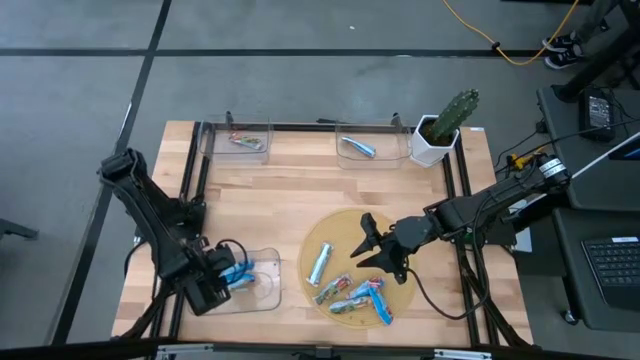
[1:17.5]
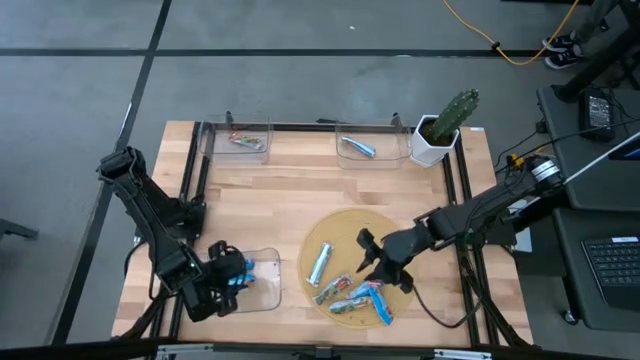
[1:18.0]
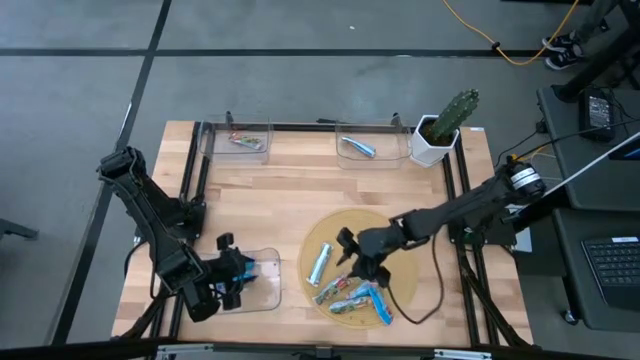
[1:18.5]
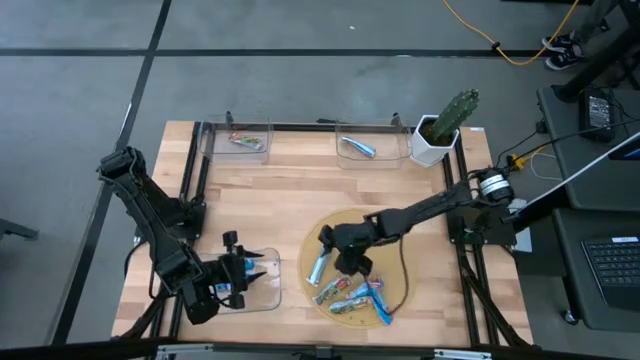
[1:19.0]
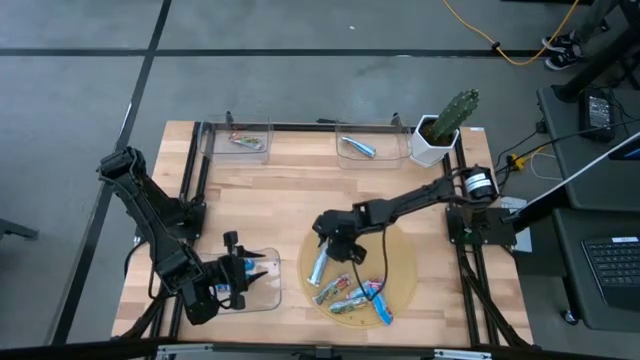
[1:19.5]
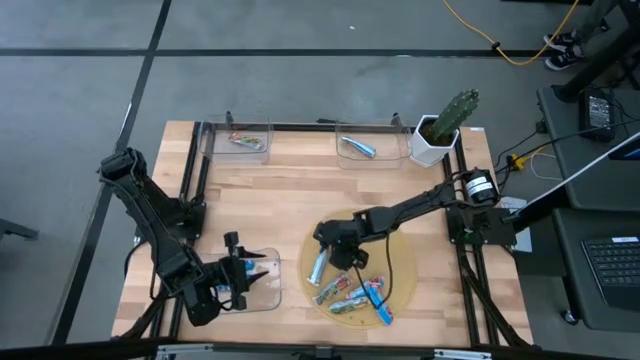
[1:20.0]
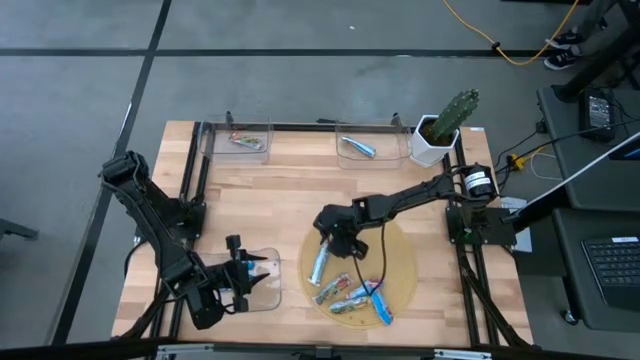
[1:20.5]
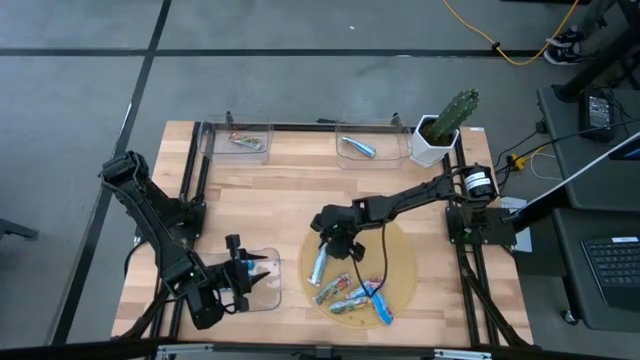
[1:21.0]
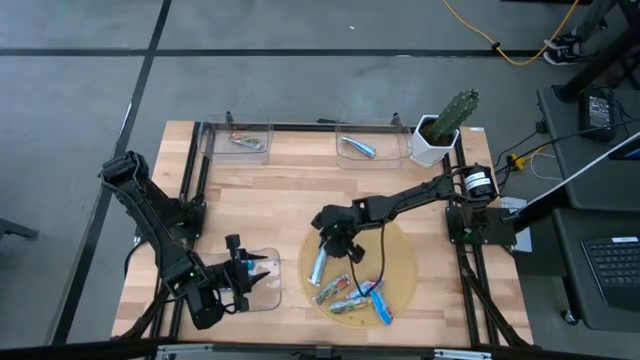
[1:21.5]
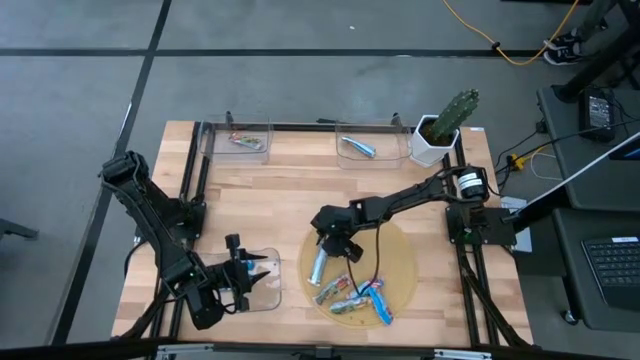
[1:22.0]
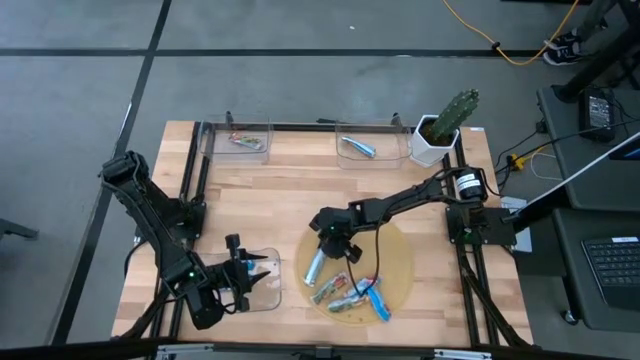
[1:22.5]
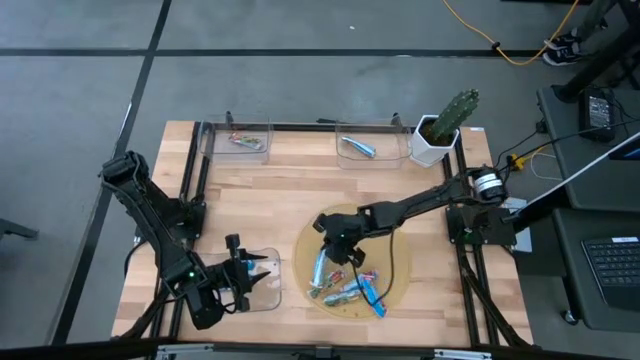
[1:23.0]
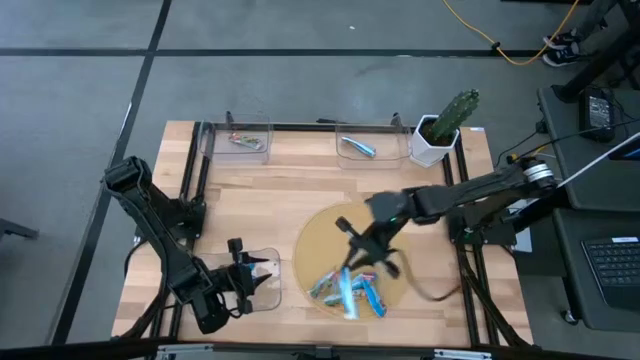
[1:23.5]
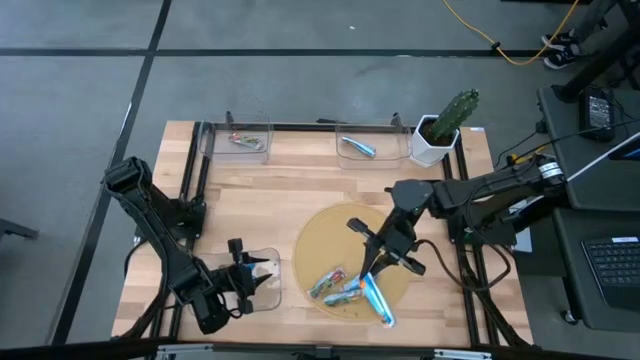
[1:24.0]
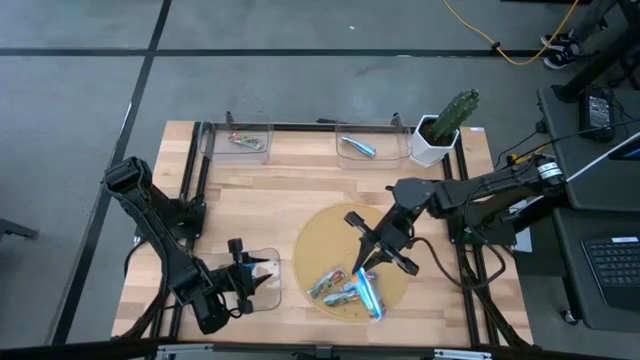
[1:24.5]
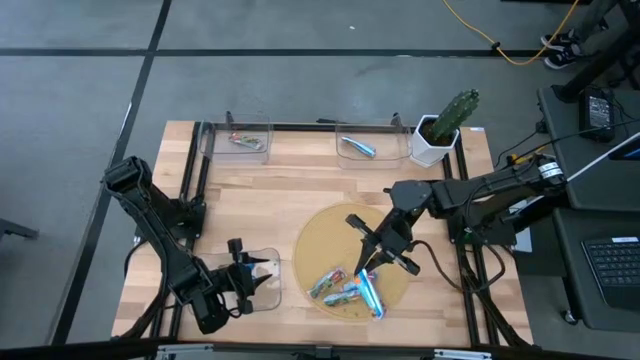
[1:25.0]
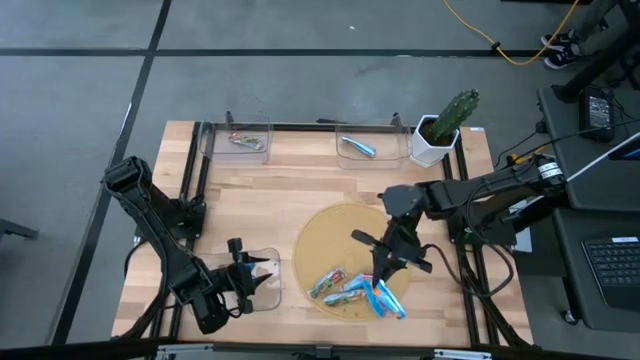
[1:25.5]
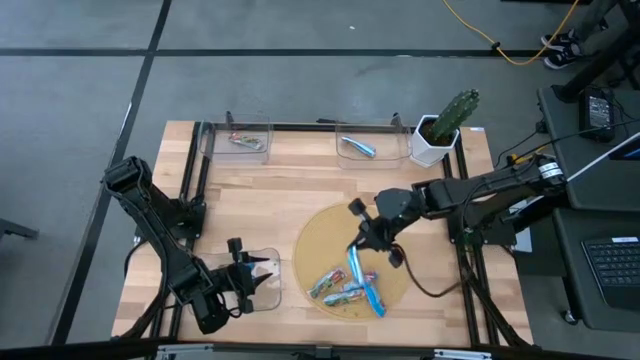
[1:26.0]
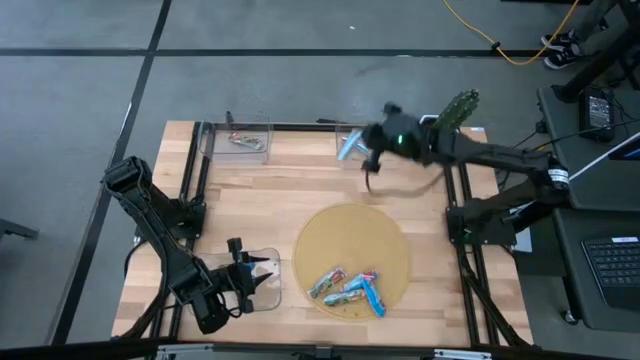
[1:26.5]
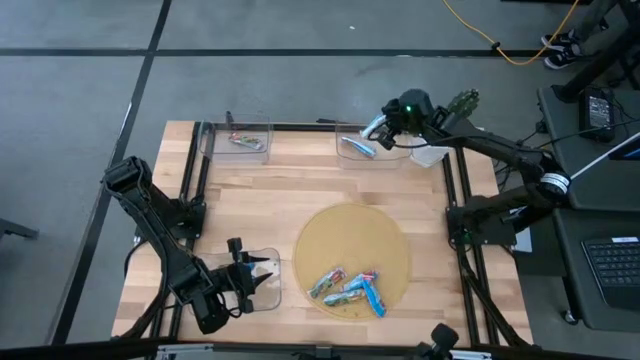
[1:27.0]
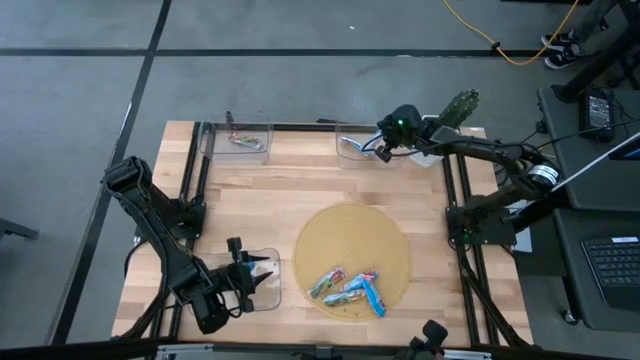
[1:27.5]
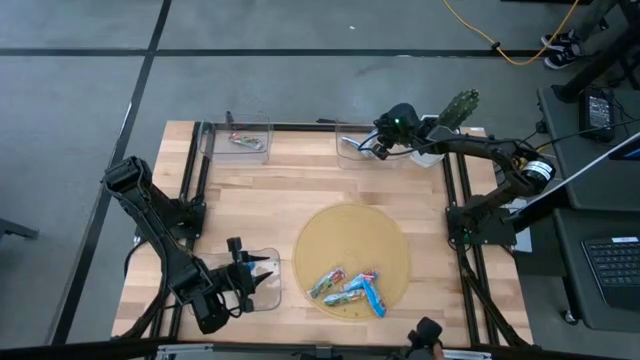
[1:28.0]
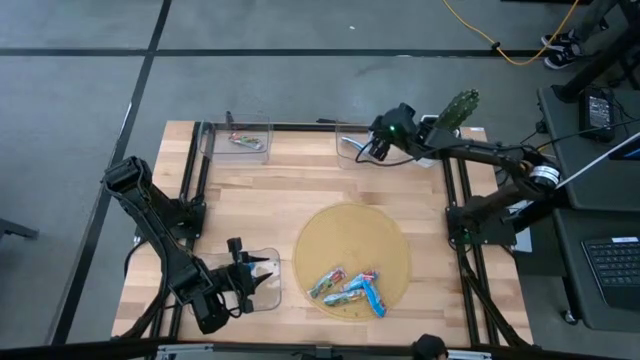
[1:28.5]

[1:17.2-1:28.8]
Task: Pick and place Granola Bars by type
Put the orange granola bar into the top right transparent bin

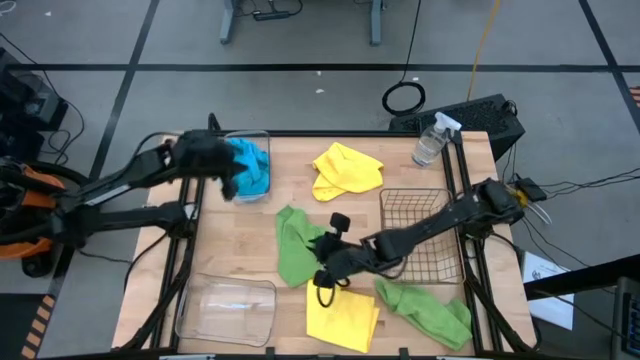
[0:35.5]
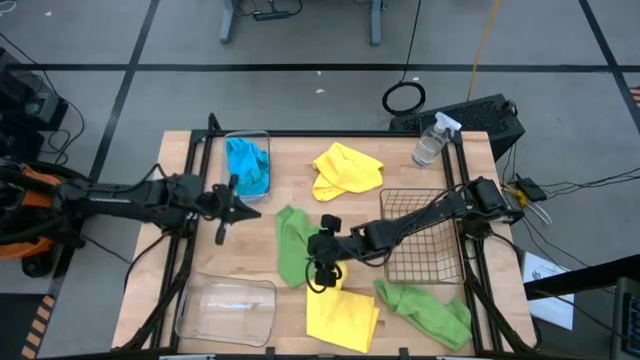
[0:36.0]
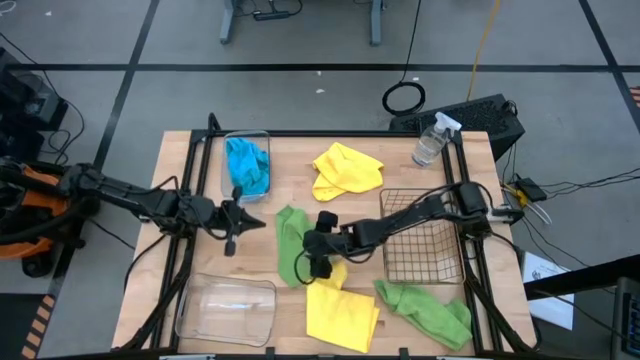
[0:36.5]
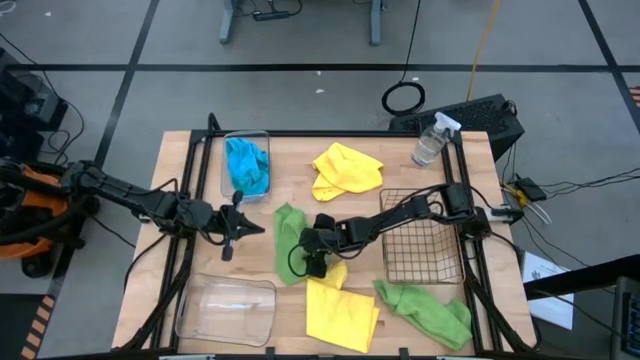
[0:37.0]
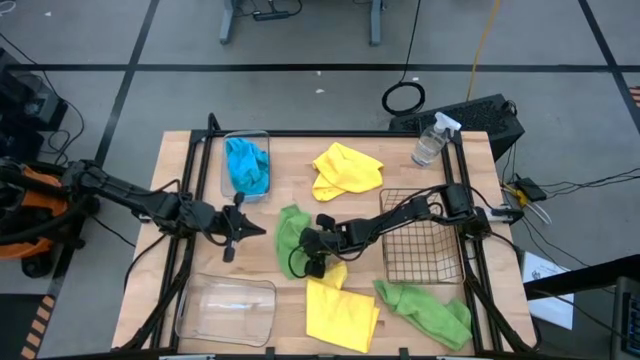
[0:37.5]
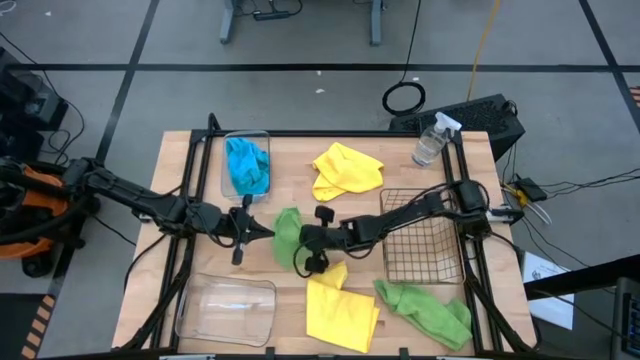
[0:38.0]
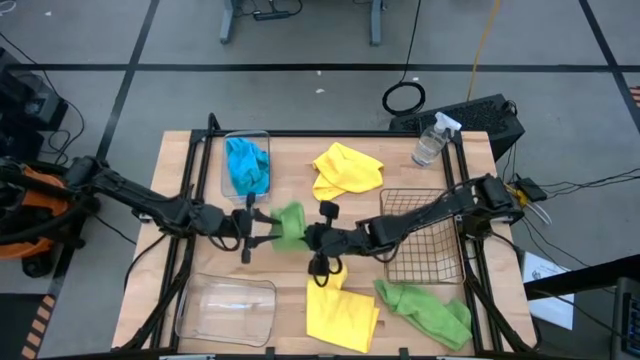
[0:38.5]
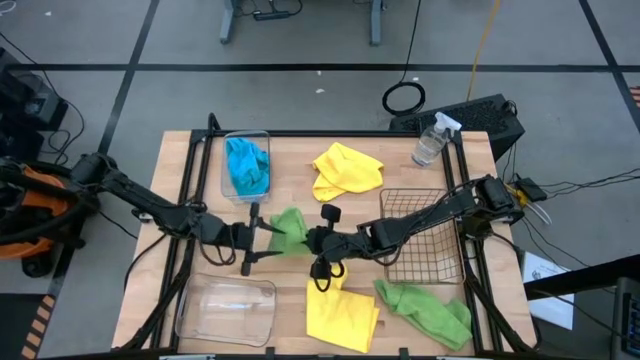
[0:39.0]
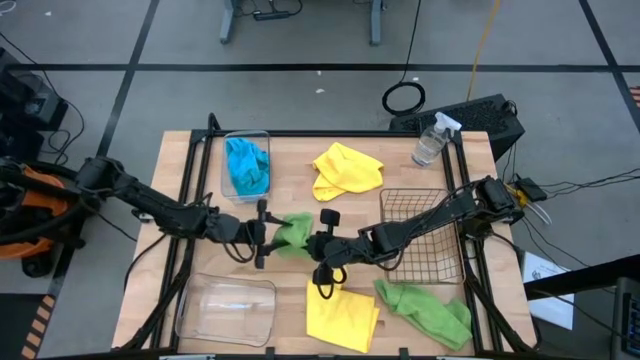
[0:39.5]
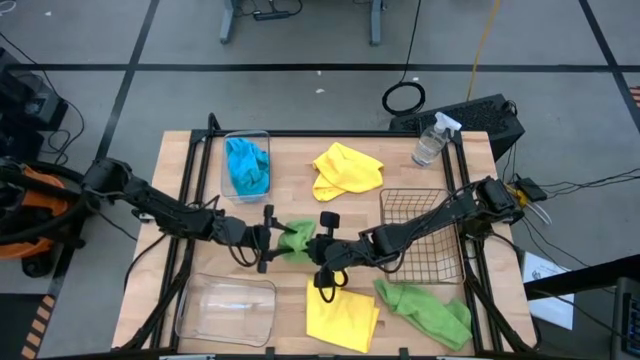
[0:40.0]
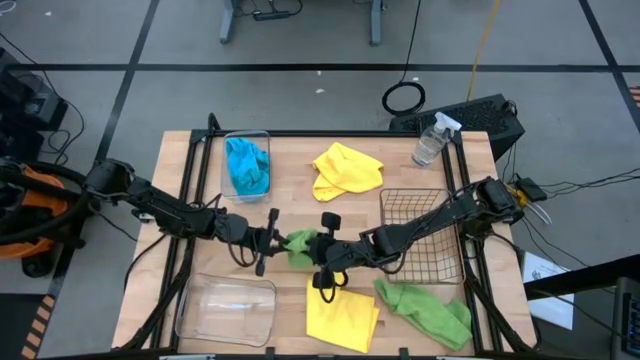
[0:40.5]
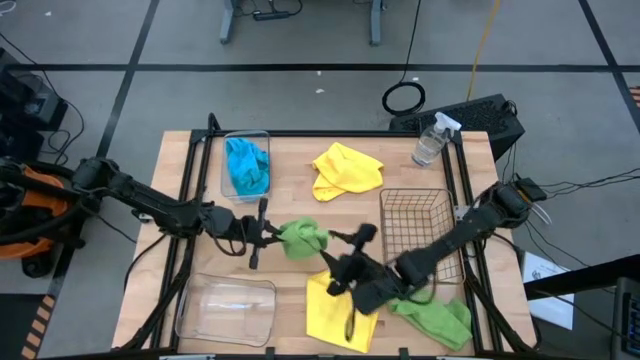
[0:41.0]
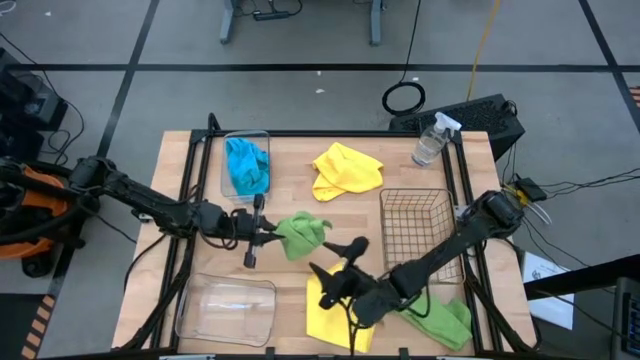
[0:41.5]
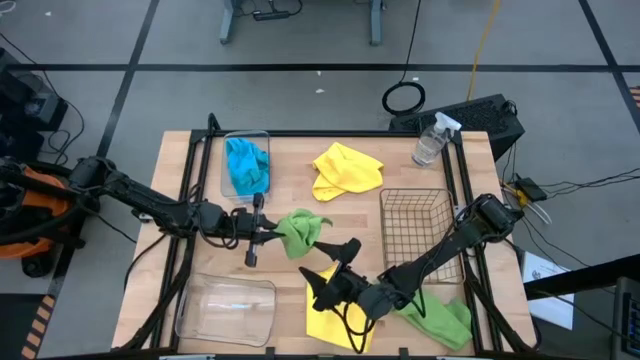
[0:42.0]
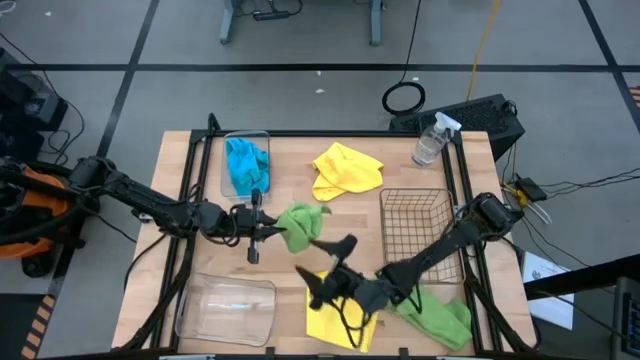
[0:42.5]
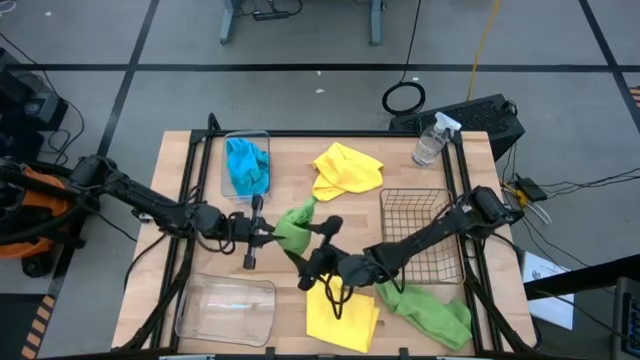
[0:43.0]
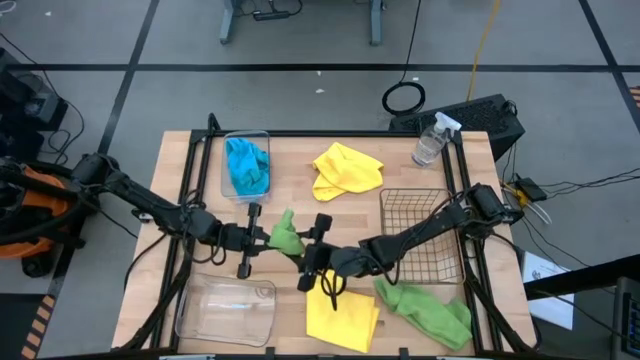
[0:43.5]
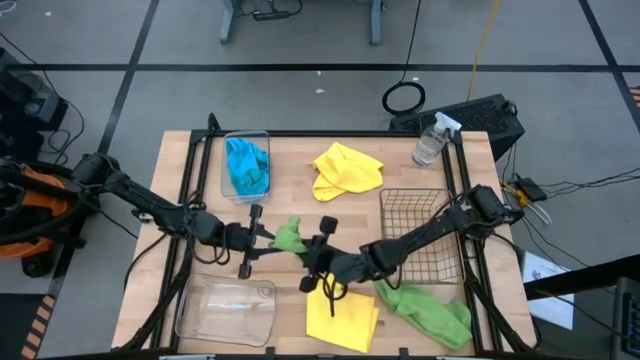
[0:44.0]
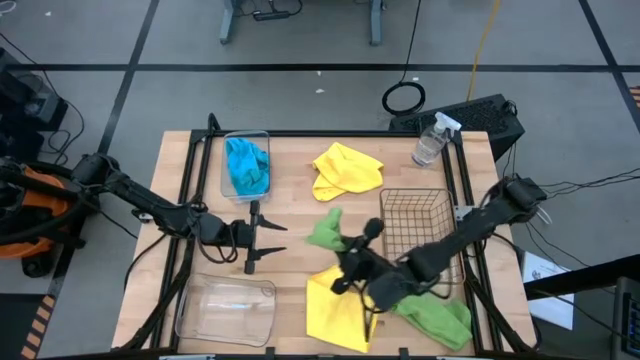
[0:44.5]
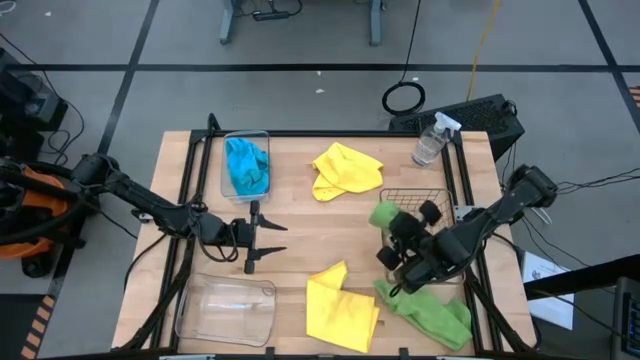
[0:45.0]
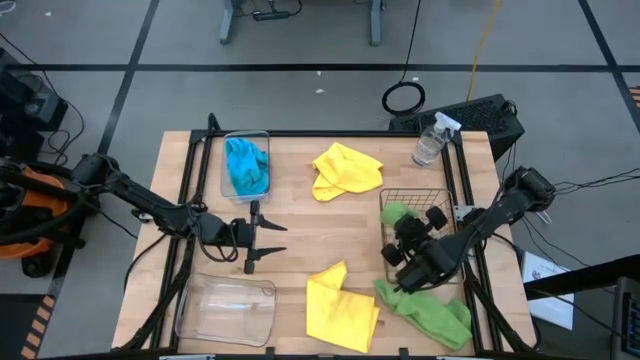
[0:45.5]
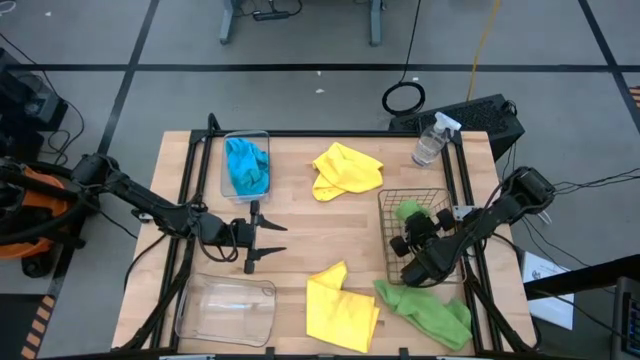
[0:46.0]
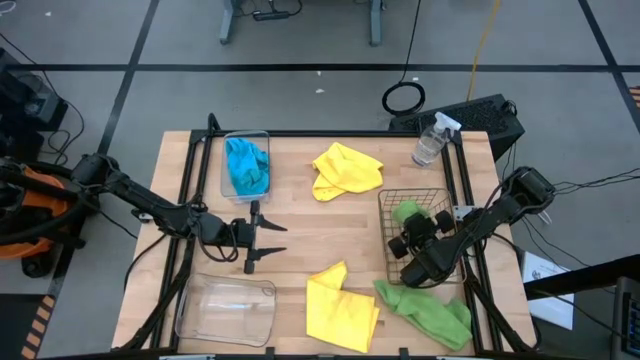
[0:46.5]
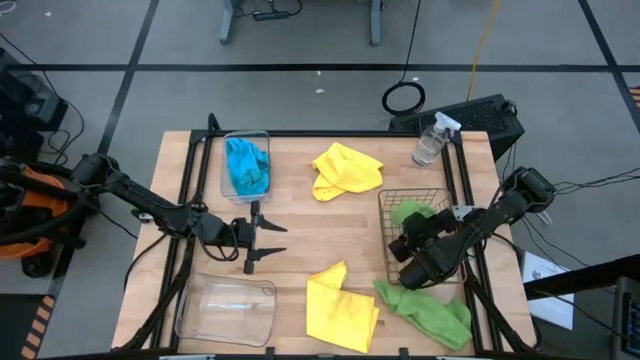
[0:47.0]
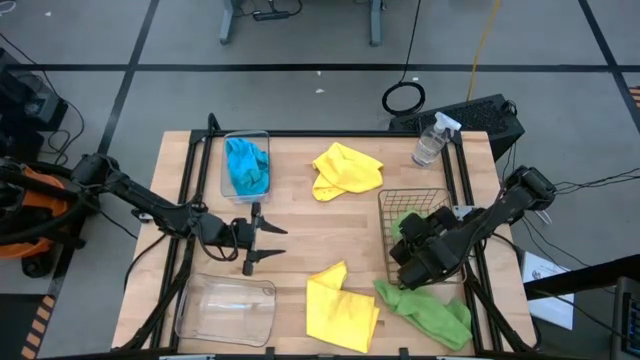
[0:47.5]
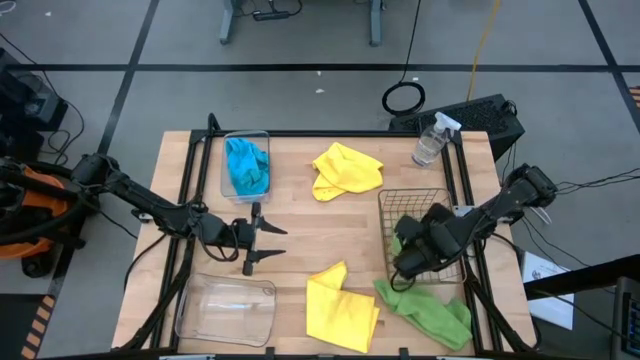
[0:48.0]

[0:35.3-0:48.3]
Task: Sort microfiber towel by color & place in baskets
Put the left green microfiber cloth into the wire basket
